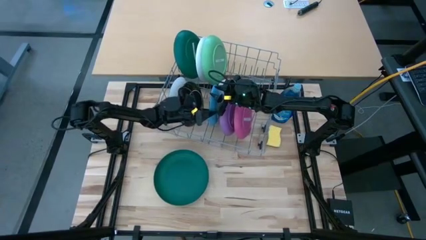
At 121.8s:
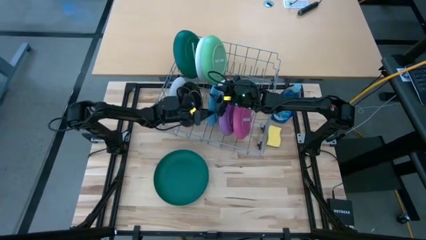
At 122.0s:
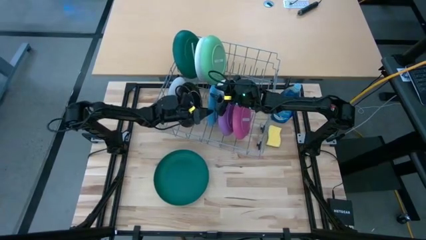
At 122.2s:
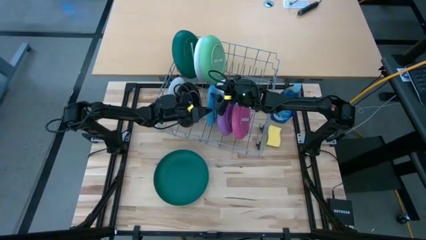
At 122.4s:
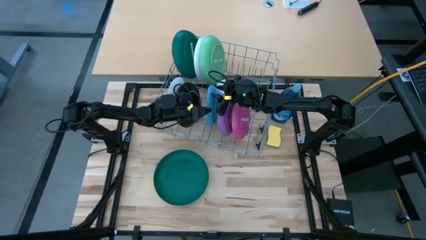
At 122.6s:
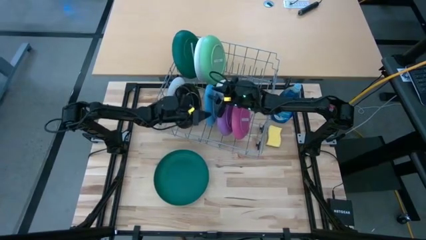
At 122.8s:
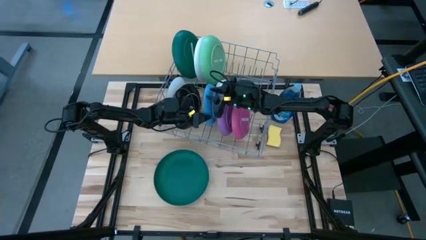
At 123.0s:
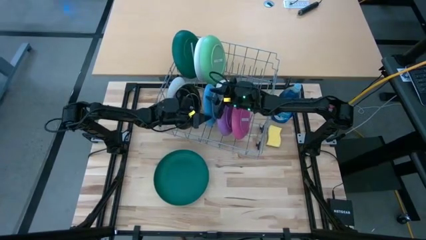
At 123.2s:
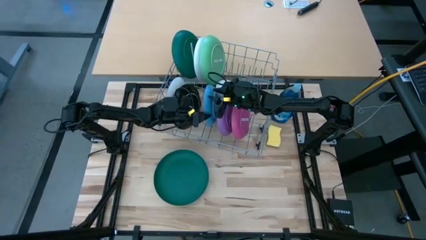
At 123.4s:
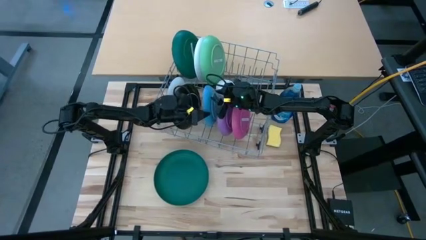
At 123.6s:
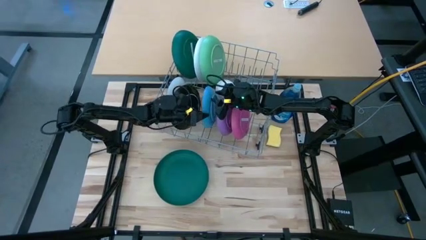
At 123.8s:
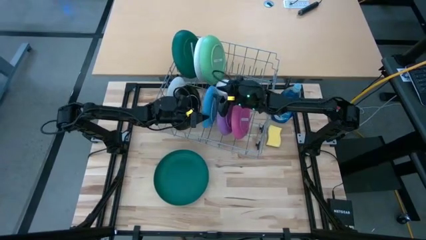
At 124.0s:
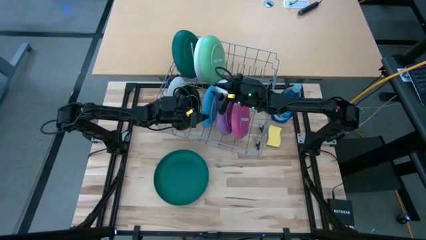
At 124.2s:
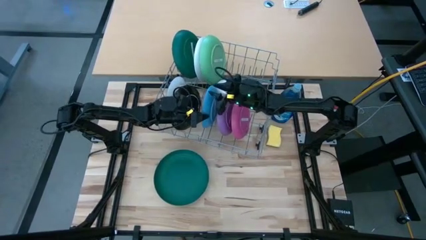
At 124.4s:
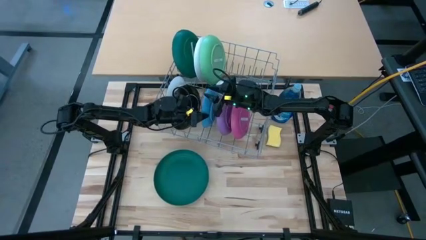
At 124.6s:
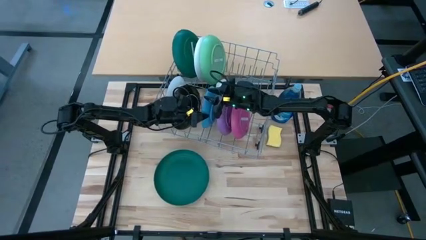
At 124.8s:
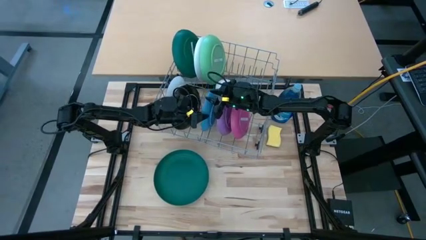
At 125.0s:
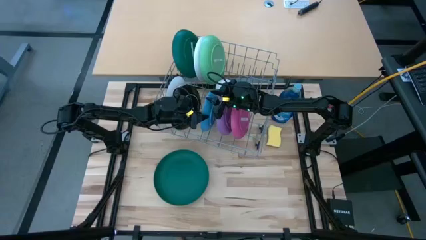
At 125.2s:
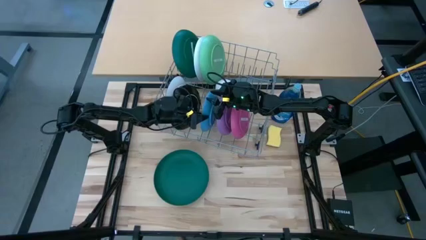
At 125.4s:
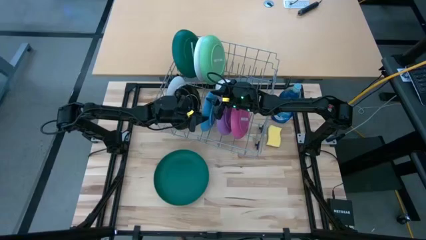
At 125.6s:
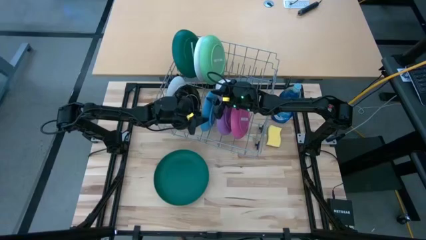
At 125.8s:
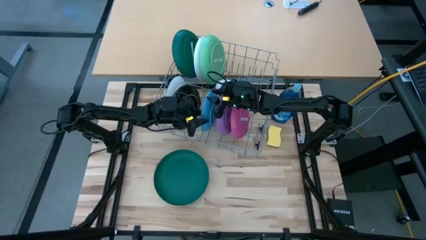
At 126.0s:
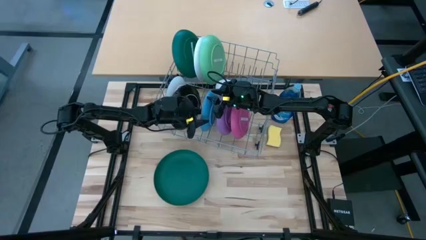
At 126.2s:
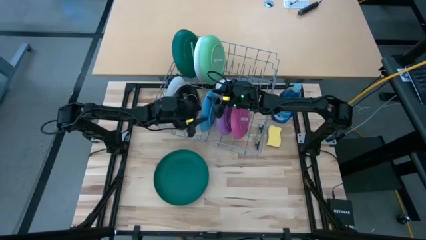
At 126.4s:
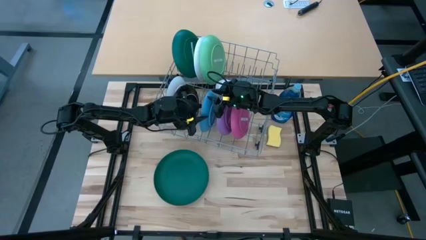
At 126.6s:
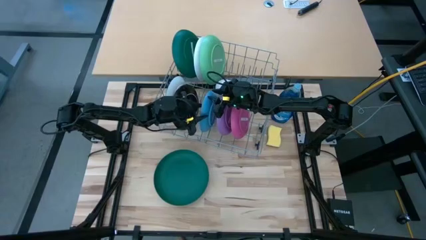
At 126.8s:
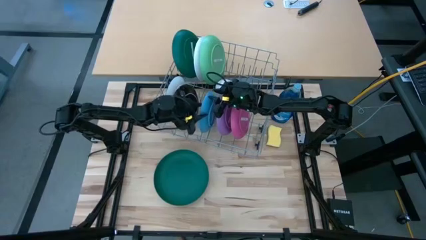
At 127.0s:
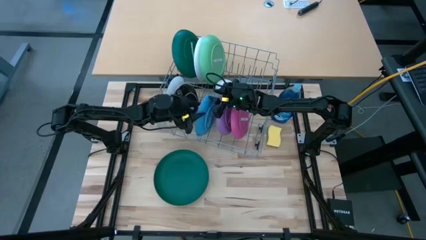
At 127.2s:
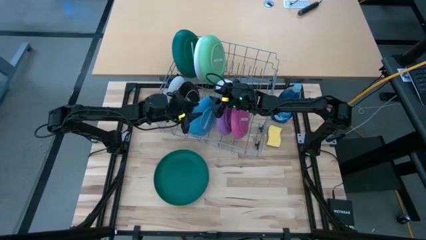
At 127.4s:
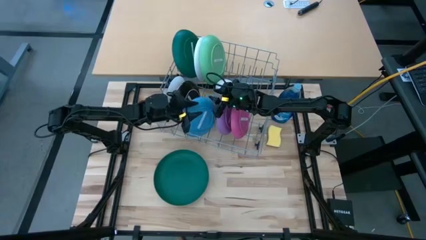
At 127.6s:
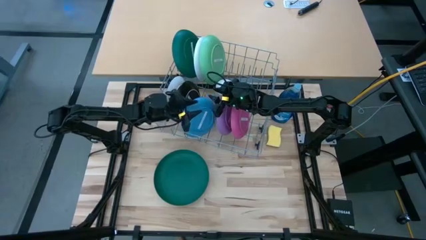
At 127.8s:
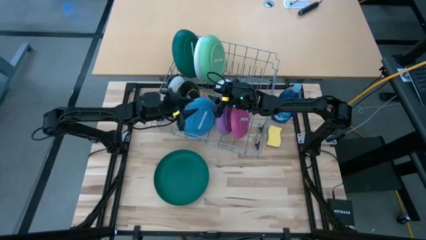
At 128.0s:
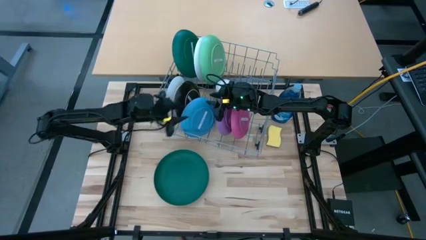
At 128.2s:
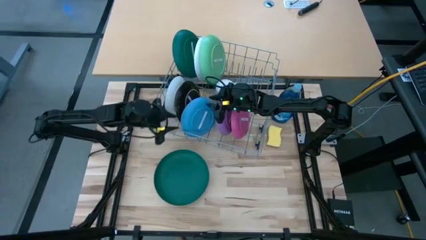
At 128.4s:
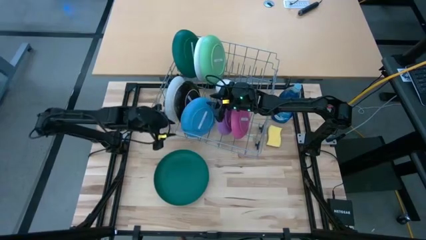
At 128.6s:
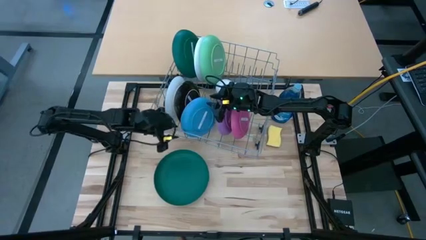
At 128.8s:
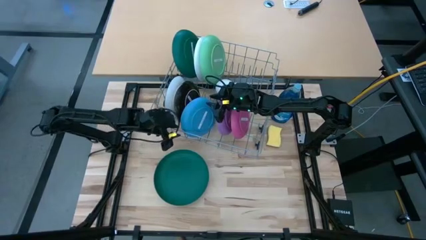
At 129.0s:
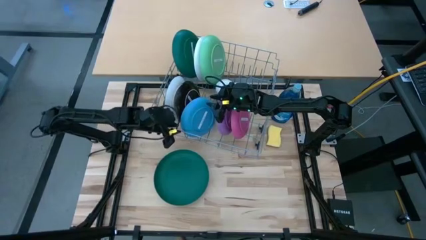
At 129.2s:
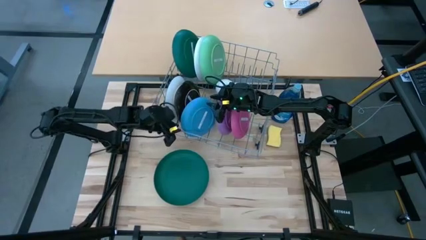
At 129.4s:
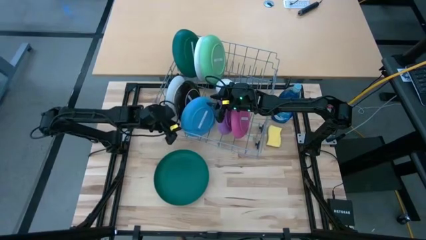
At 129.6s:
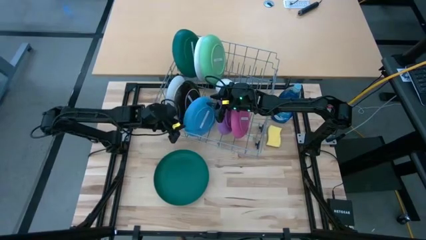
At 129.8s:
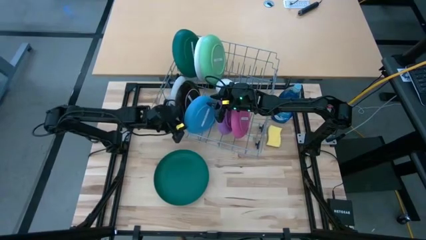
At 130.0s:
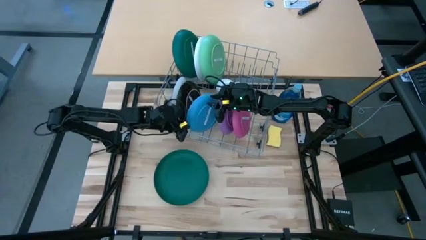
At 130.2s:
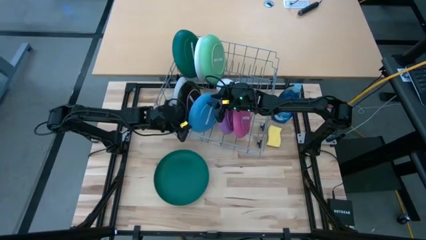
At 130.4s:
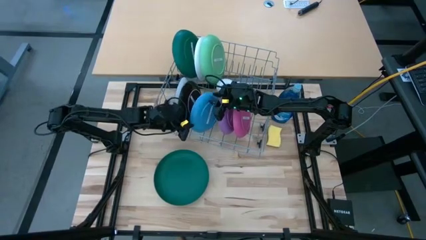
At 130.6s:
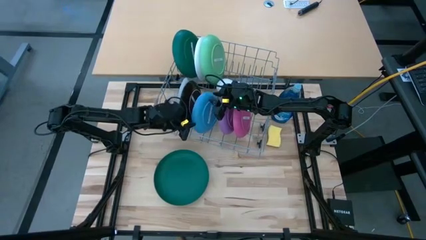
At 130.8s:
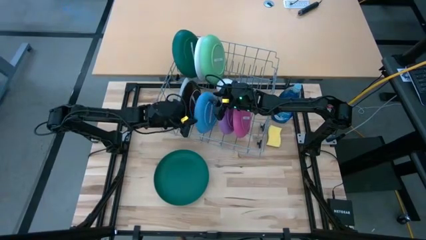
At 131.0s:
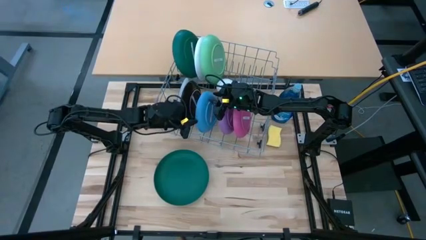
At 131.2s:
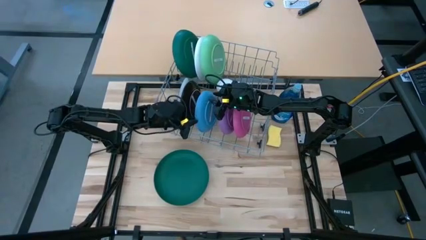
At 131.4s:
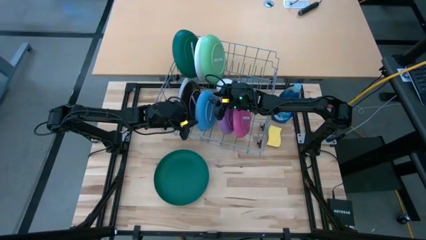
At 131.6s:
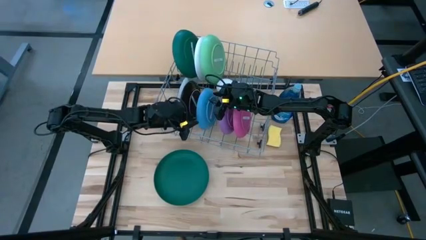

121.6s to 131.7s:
Task: Sort dishes
Put the light blue plate in the dish rack

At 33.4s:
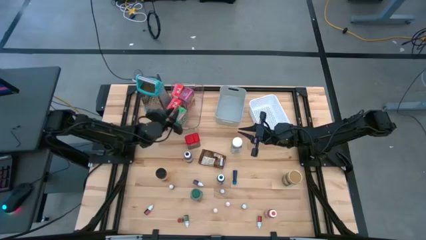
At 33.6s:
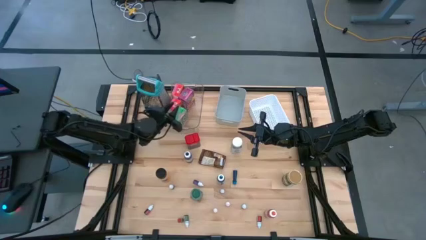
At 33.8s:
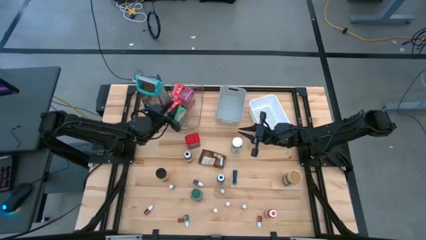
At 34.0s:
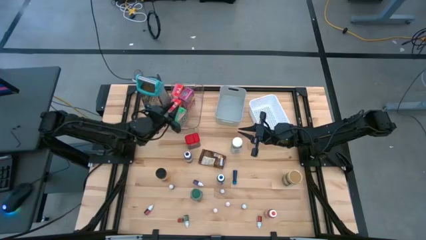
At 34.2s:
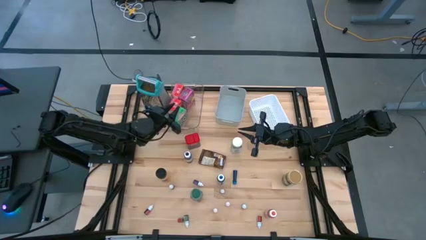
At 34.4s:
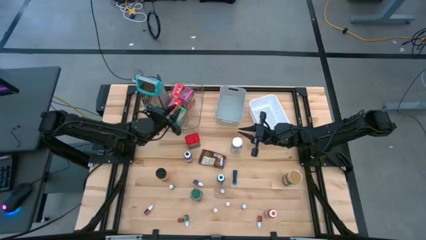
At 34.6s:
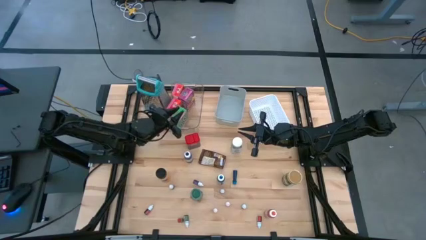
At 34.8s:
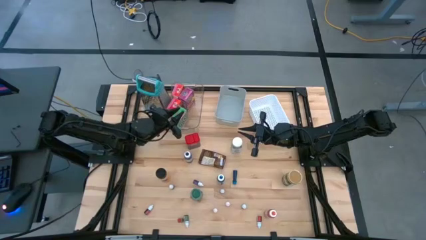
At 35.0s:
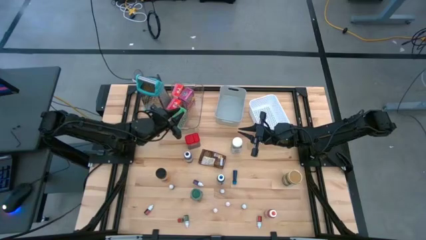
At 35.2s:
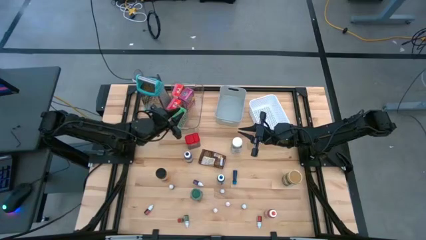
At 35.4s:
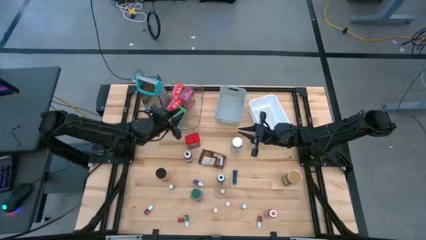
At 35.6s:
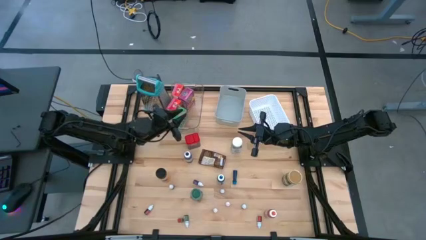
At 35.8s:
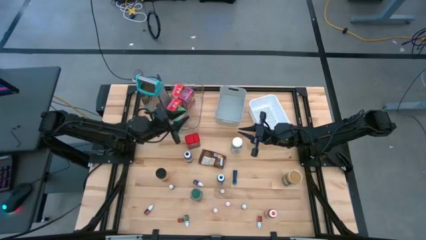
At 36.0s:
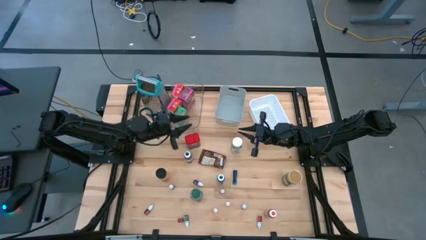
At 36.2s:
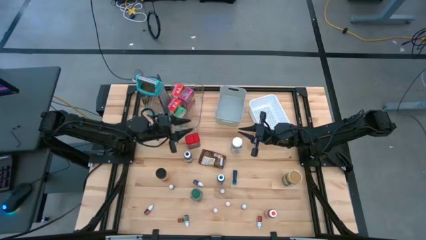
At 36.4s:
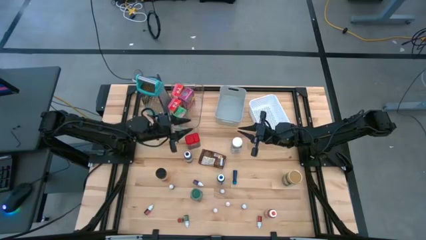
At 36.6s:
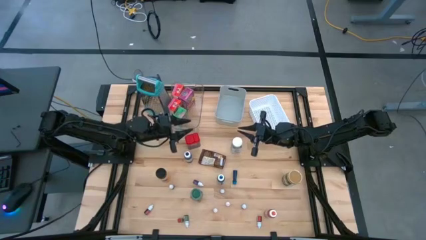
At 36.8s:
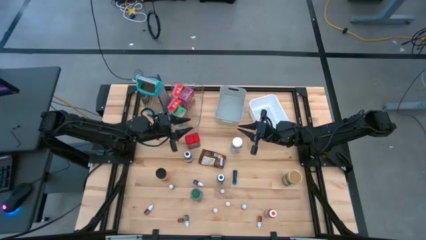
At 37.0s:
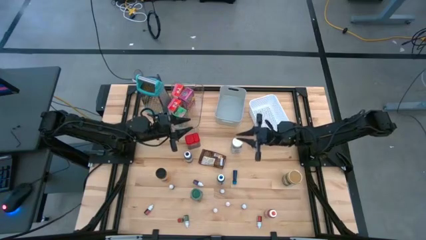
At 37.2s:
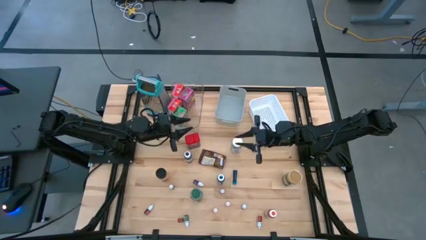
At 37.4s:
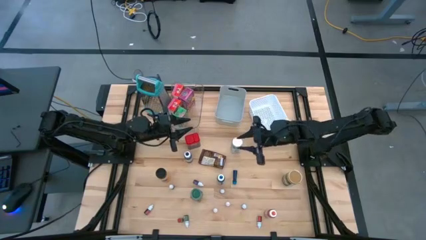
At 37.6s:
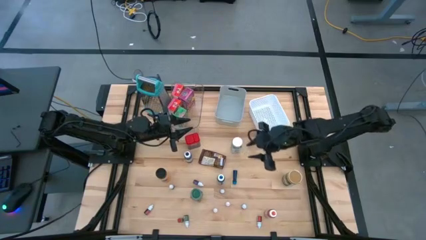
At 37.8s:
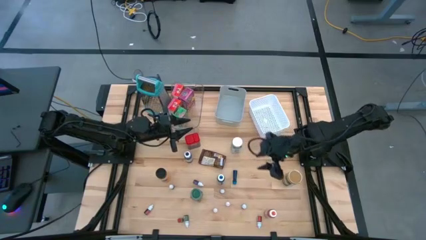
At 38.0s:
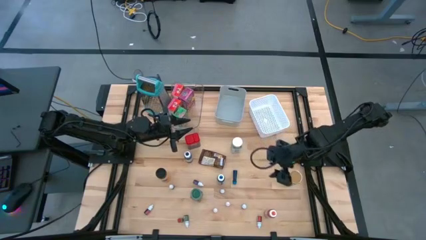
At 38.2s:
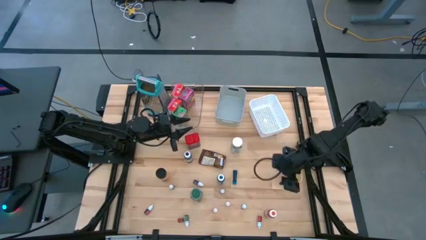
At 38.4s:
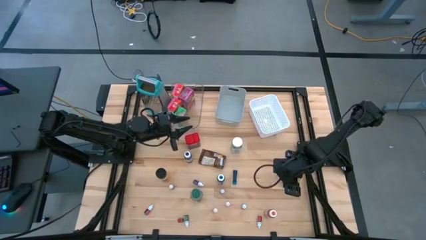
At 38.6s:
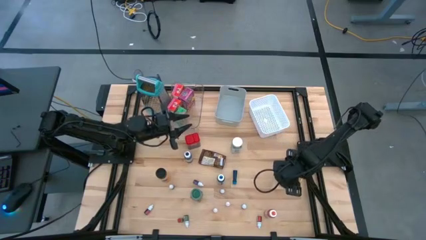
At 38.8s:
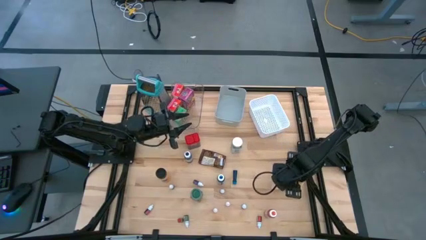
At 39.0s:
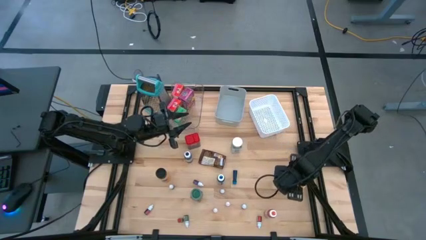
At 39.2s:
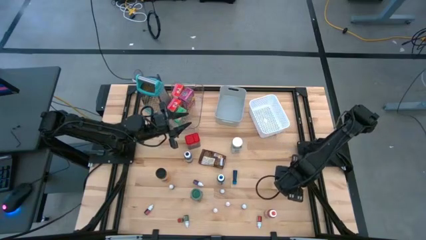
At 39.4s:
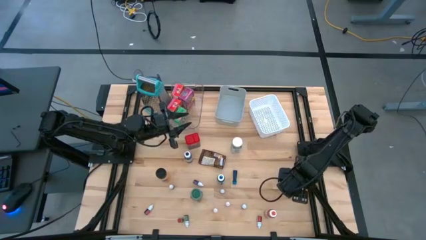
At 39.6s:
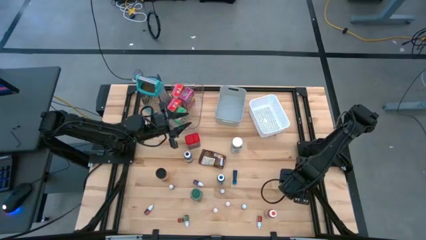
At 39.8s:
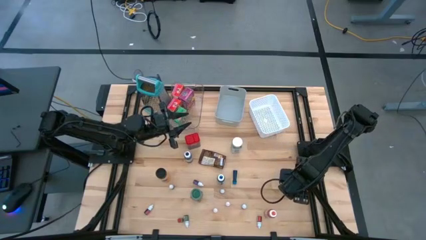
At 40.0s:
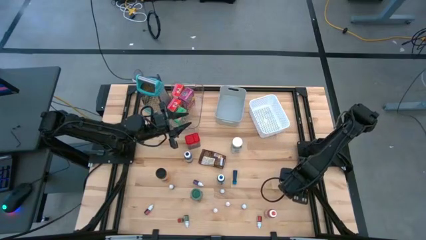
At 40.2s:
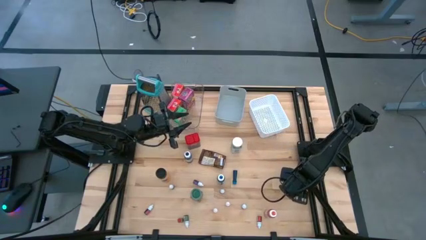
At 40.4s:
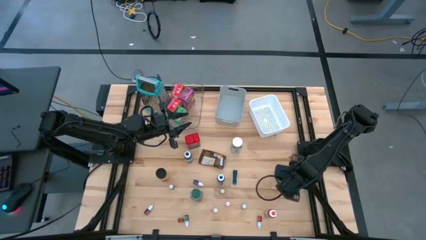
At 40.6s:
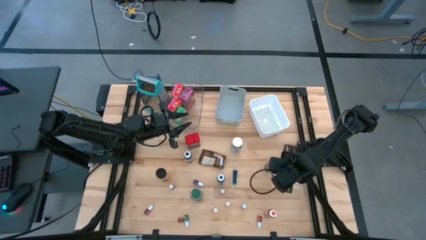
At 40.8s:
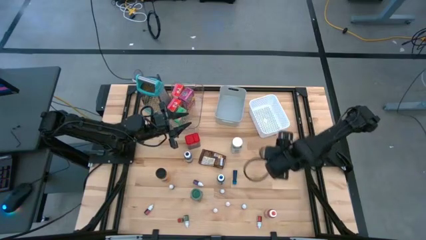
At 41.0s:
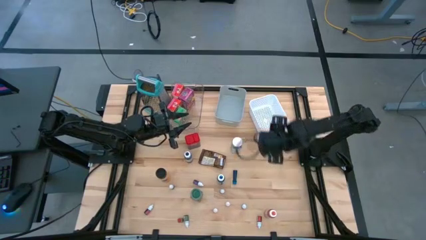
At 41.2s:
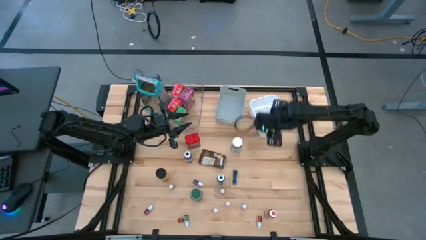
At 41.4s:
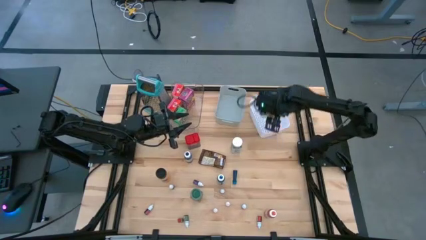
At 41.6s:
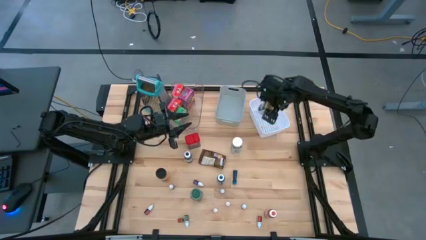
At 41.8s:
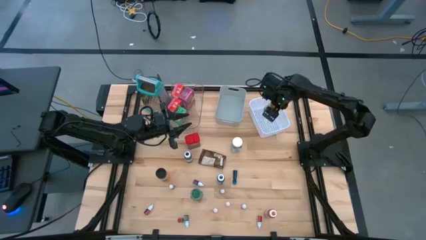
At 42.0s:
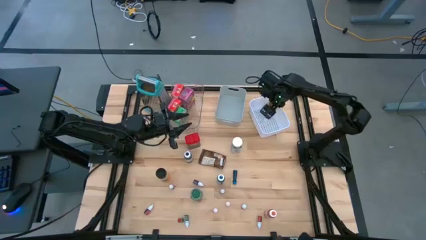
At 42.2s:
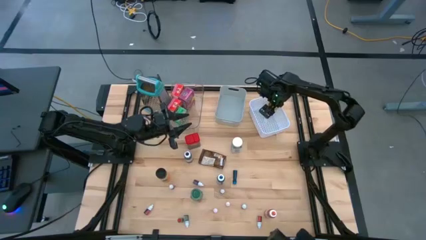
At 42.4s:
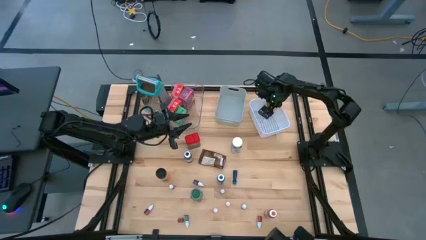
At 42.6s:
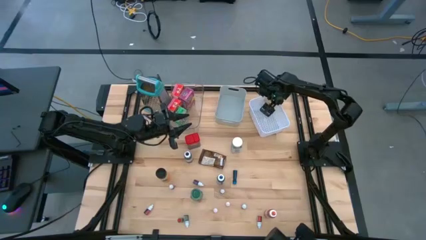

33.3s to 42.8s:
Task: Pick & Place Kitchen Items
Put the gold spice bottle into the white bin
